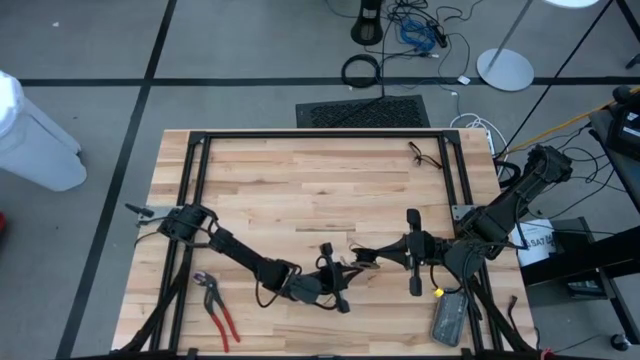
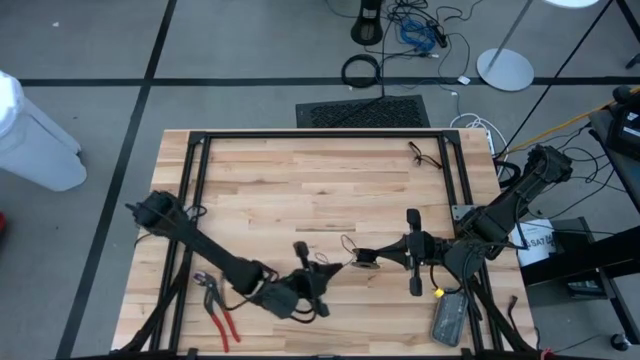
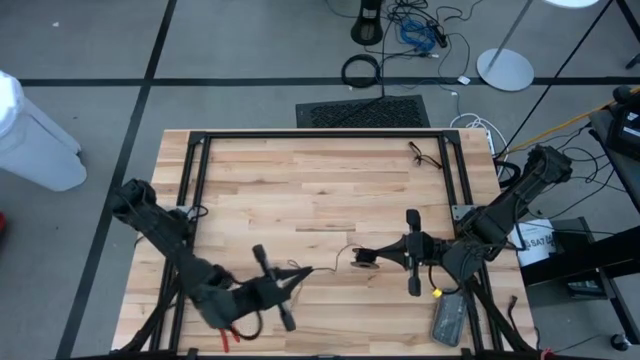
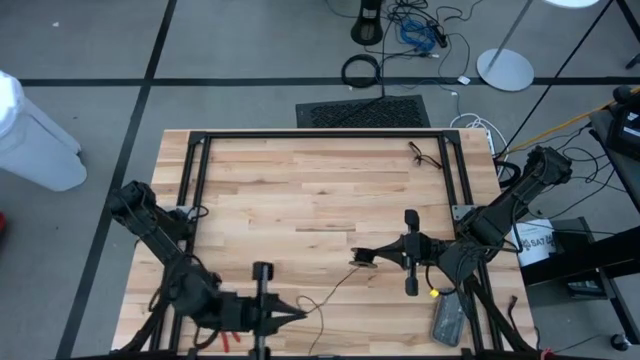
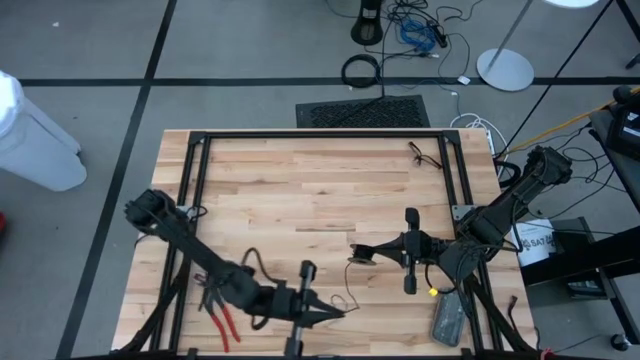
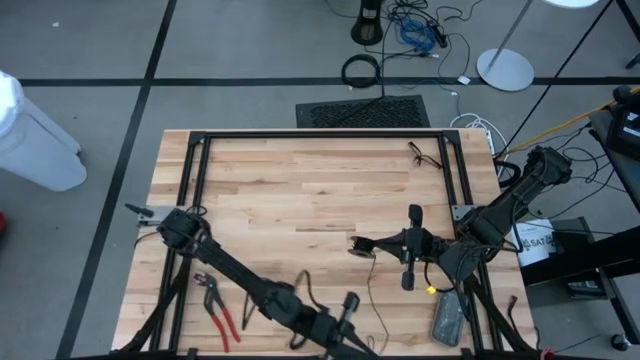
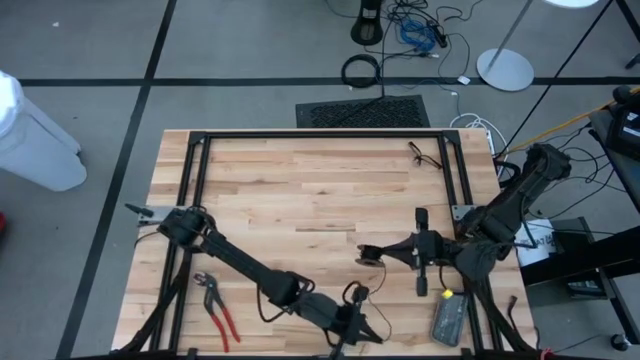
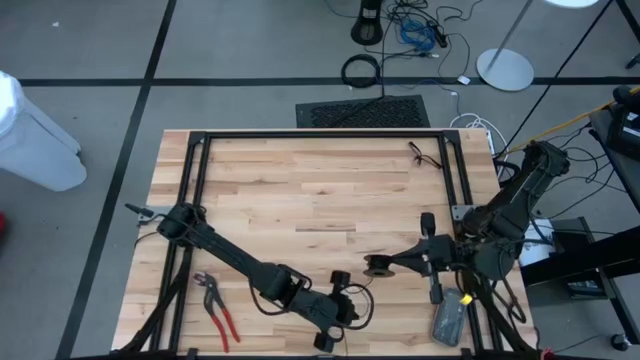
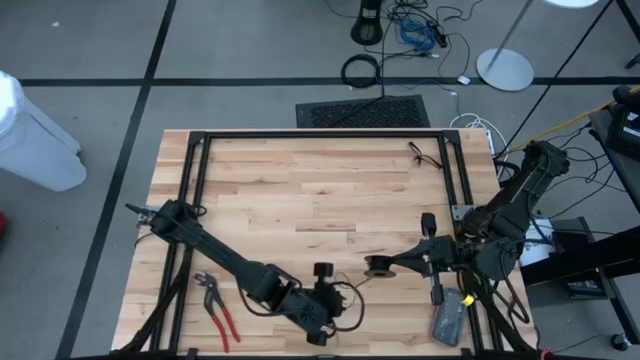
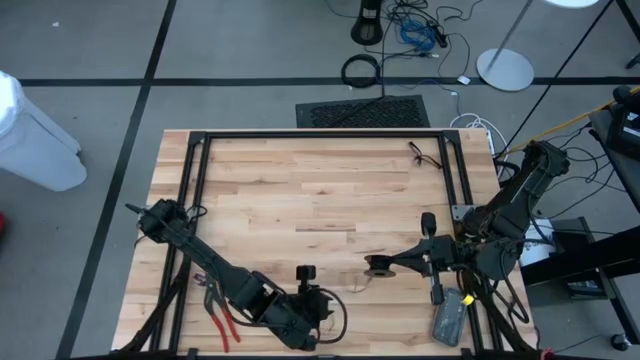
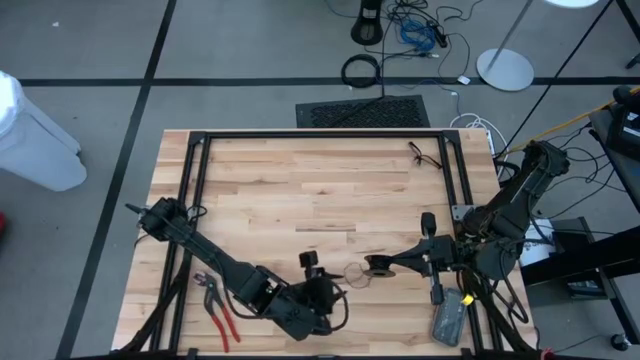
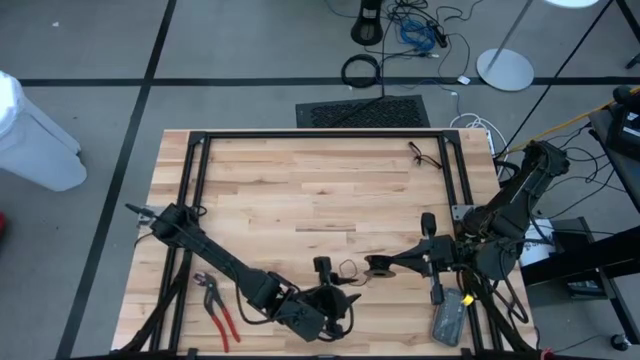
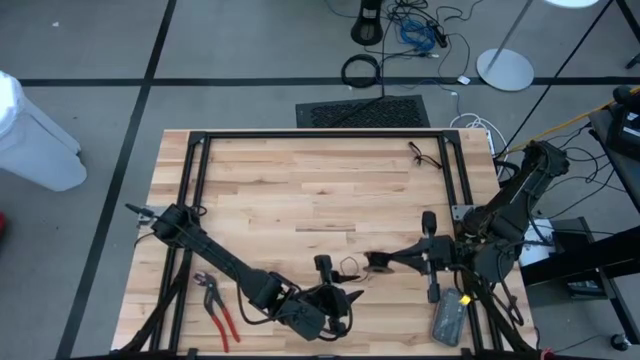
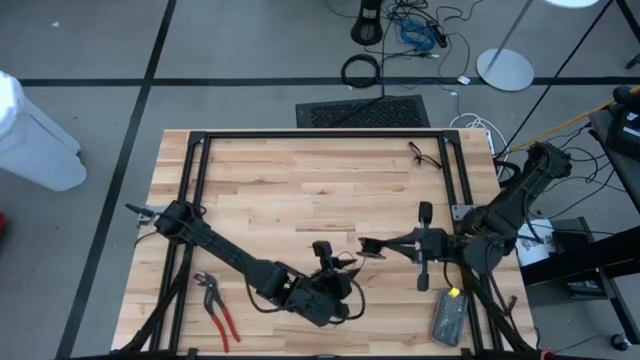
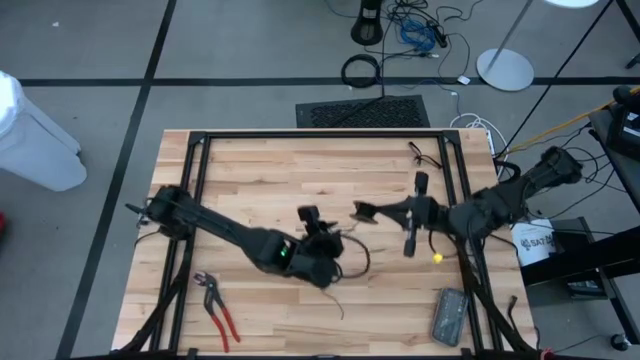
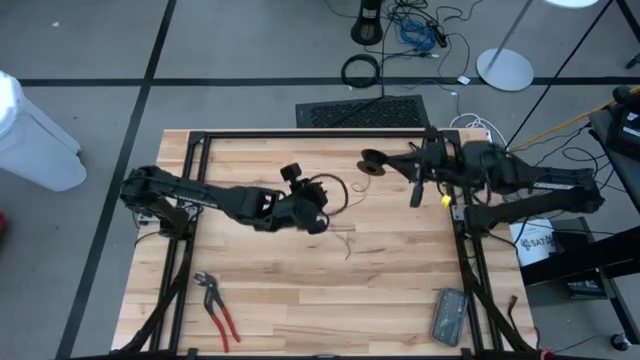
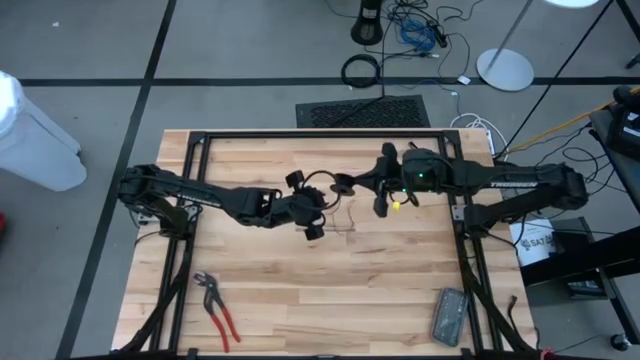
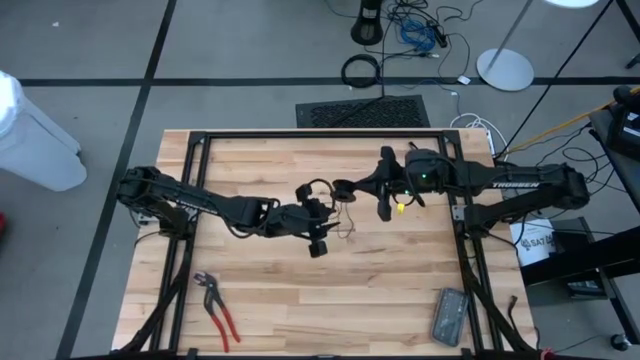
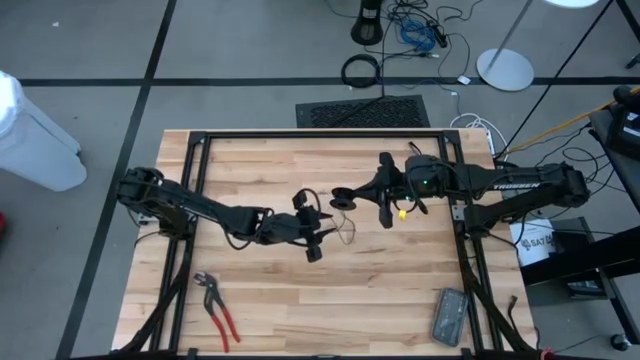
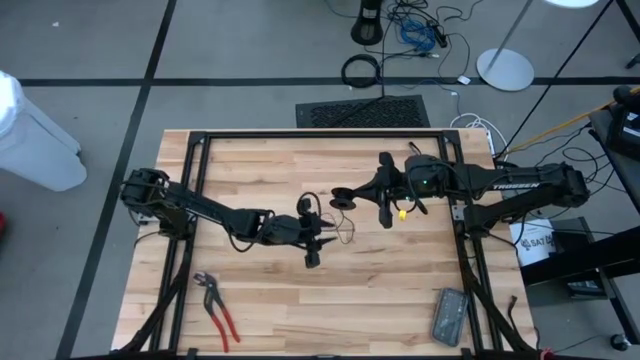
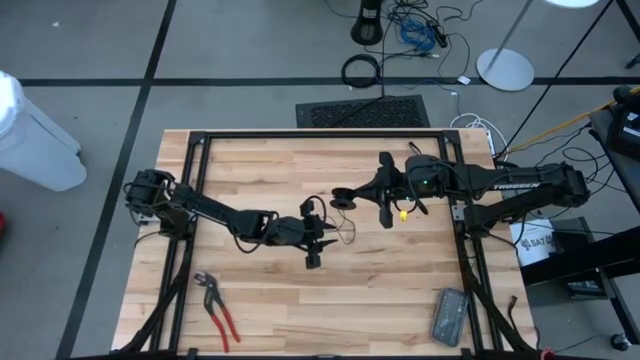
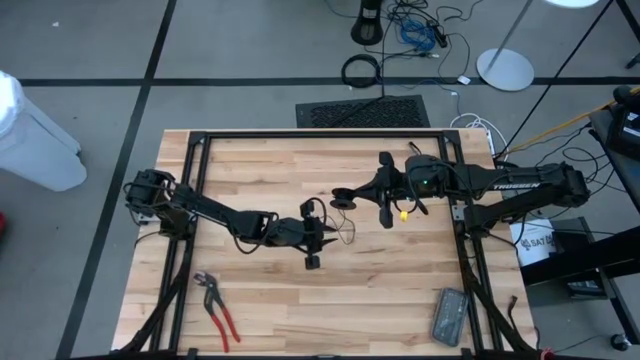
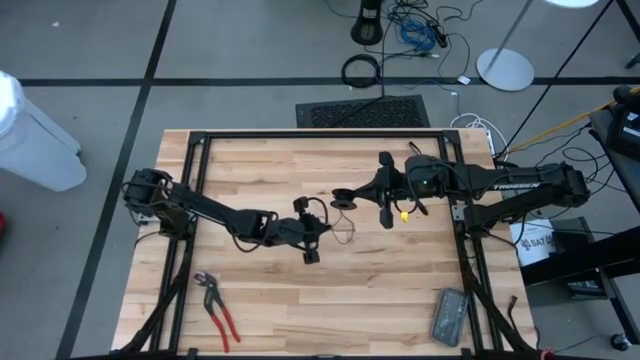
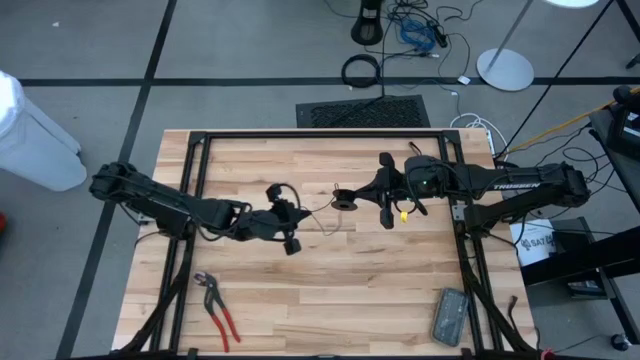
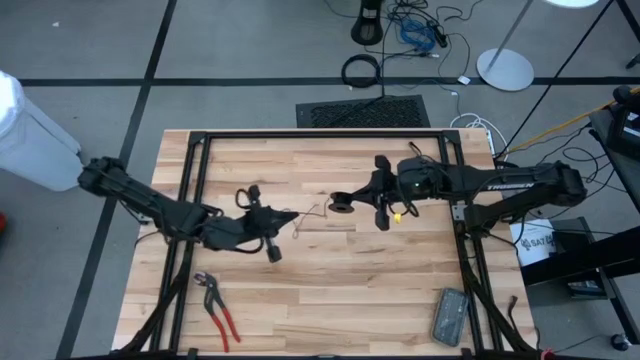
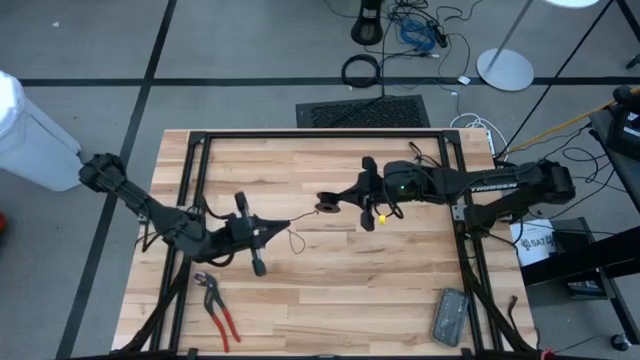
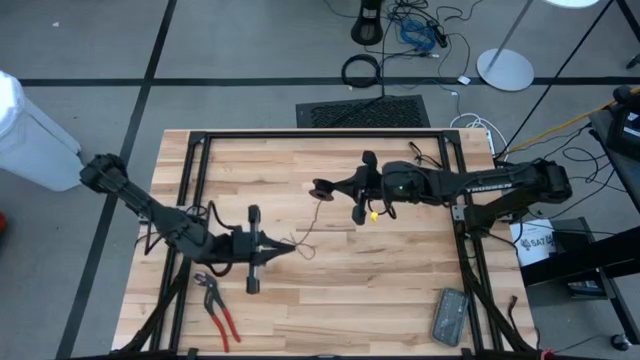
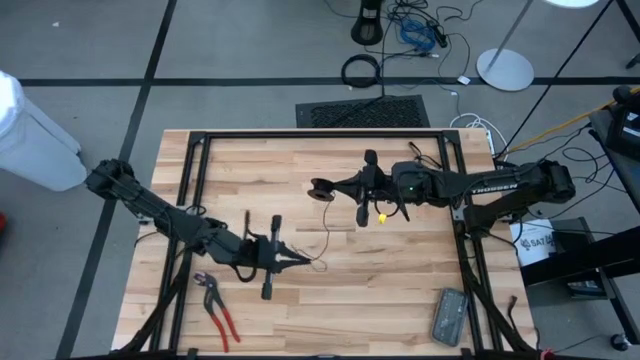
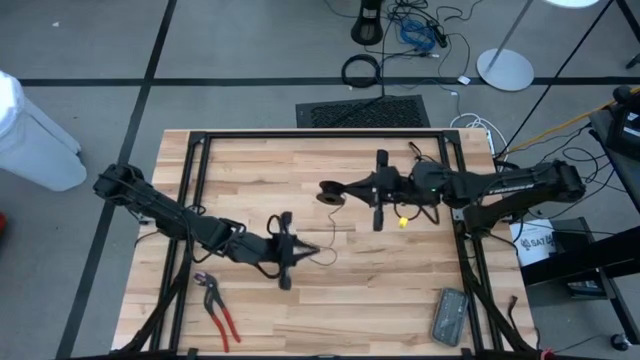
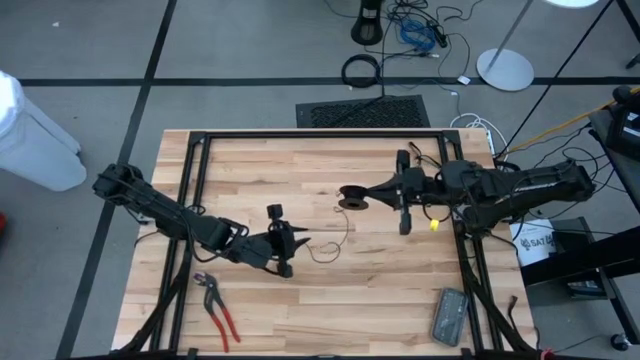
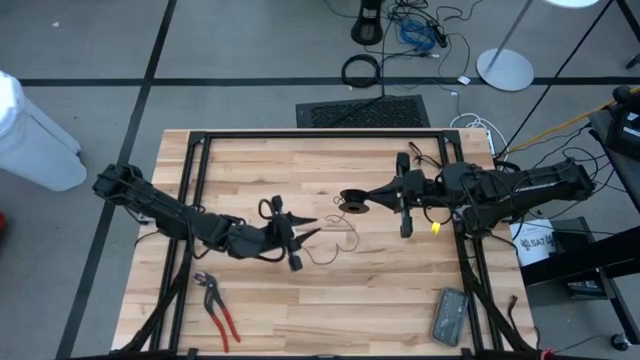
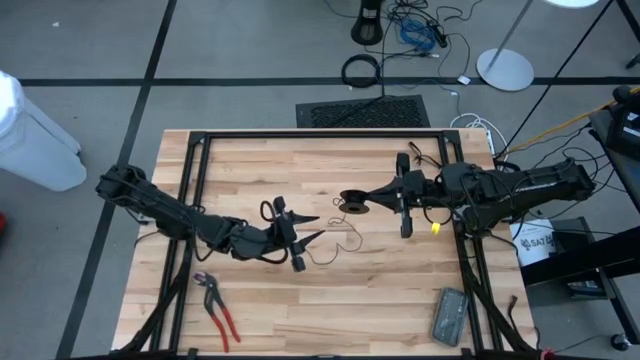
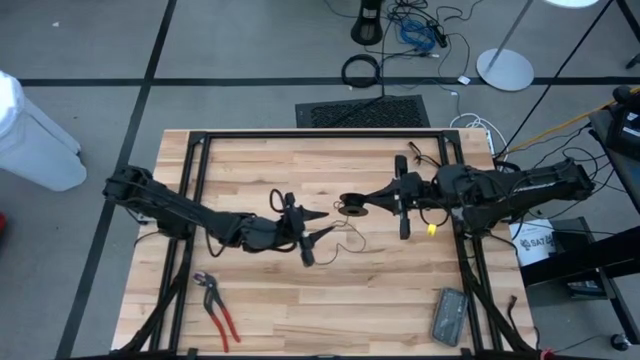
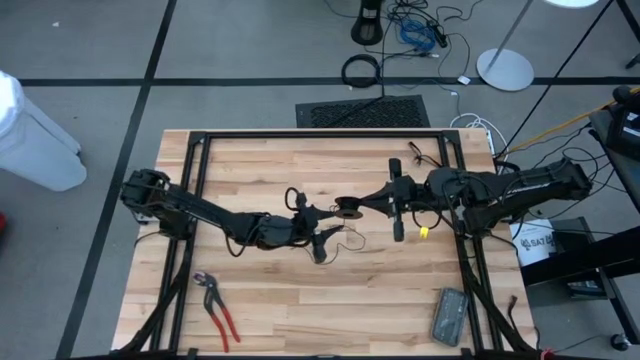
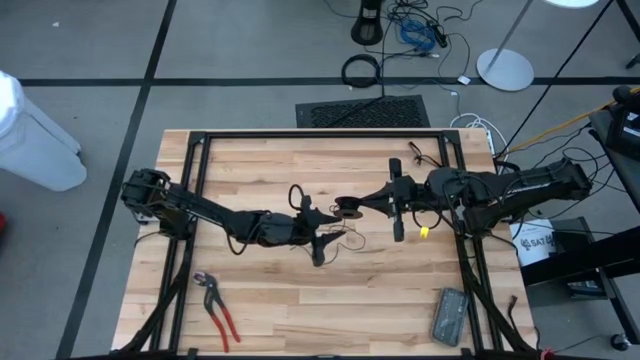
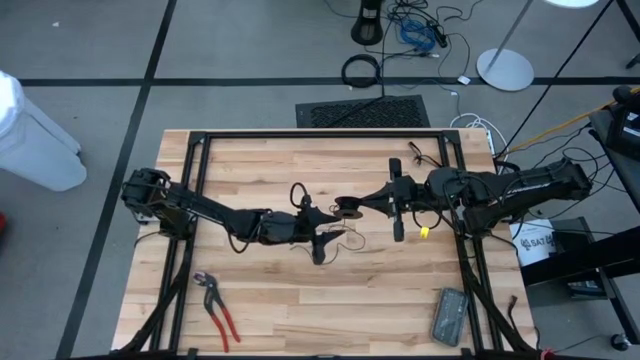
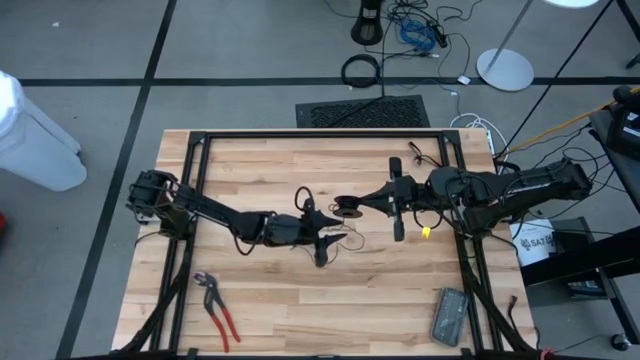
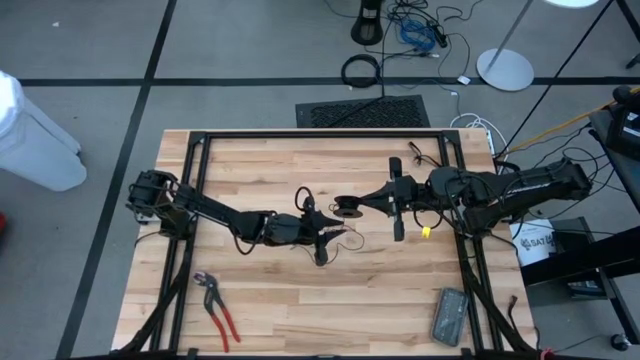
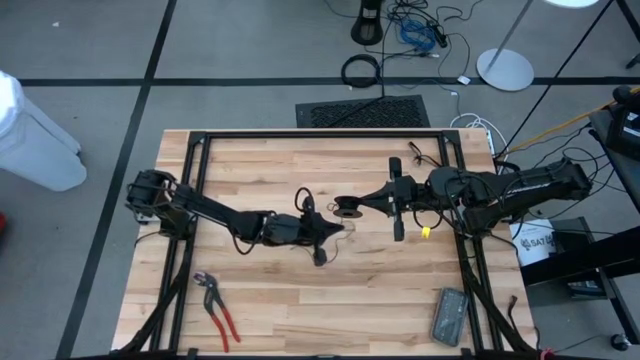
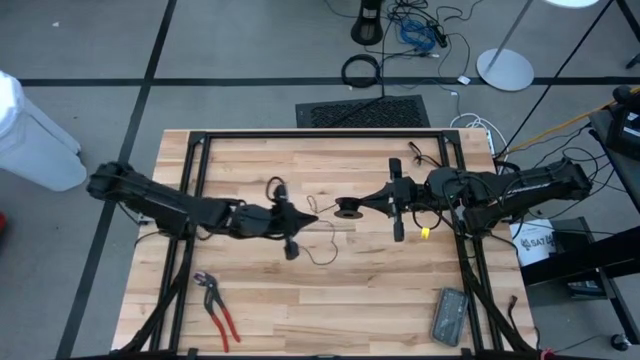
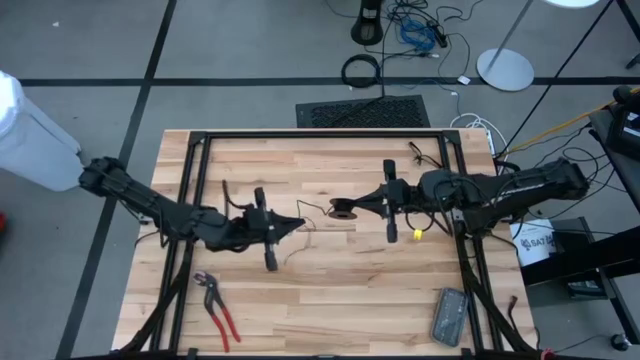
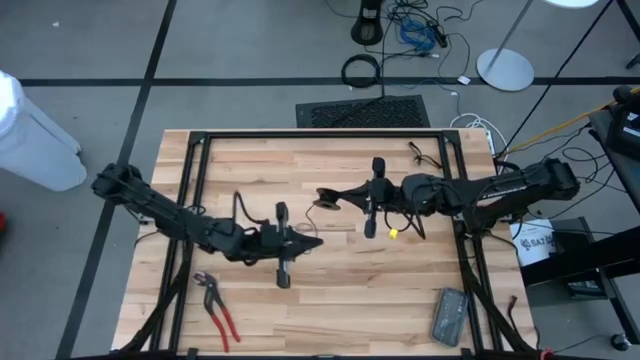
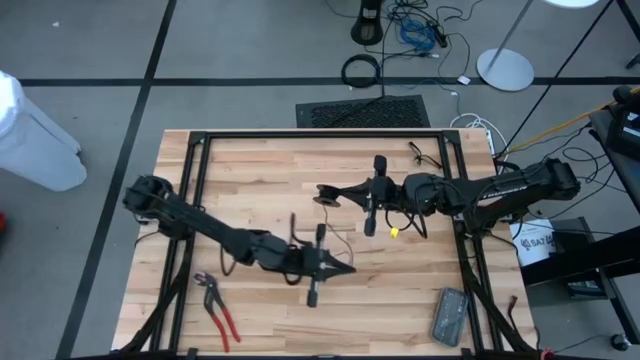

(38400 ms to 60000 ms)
Task: Coil cords
Uncoil the black wire from the black spool
